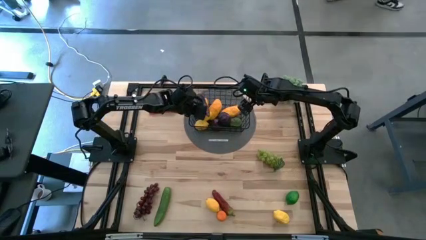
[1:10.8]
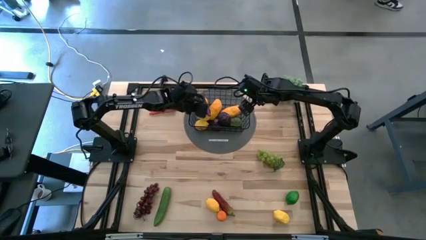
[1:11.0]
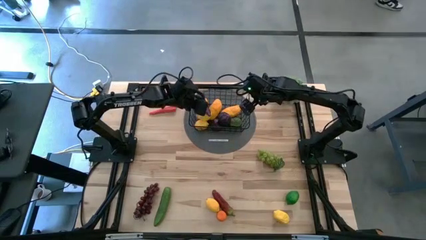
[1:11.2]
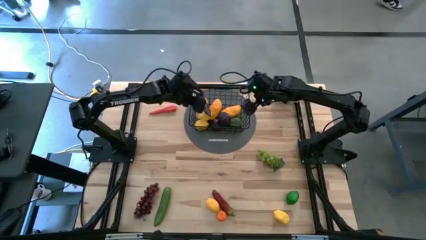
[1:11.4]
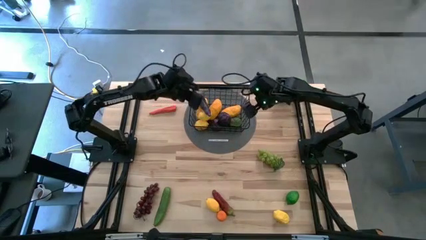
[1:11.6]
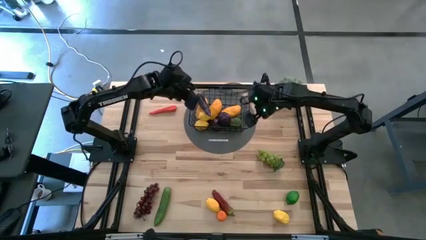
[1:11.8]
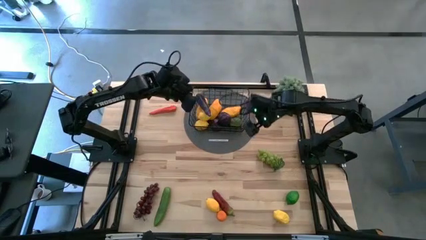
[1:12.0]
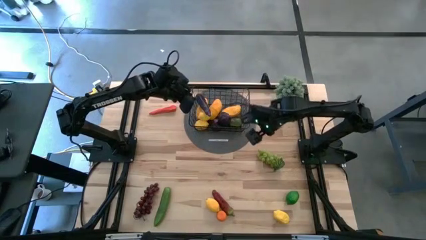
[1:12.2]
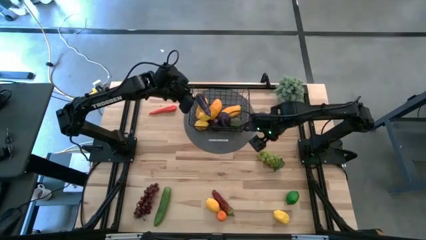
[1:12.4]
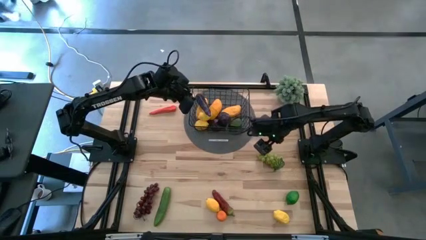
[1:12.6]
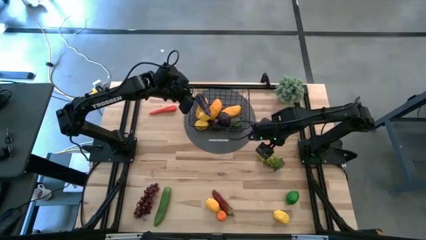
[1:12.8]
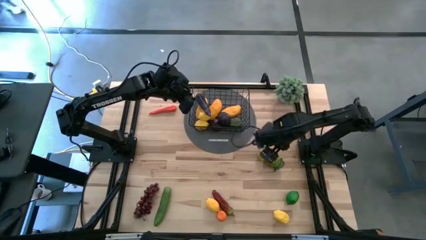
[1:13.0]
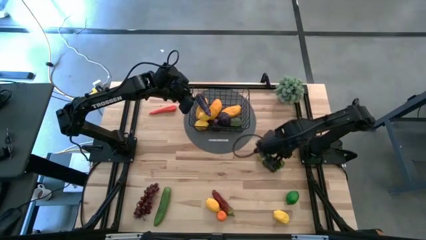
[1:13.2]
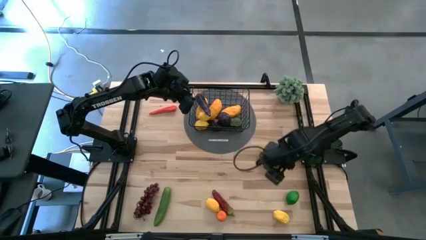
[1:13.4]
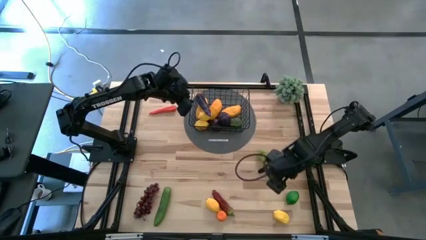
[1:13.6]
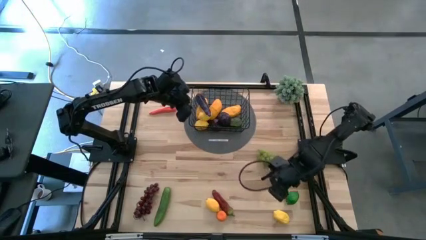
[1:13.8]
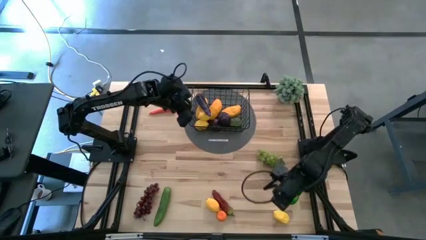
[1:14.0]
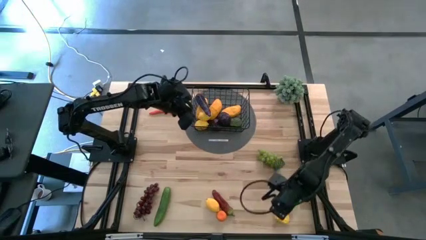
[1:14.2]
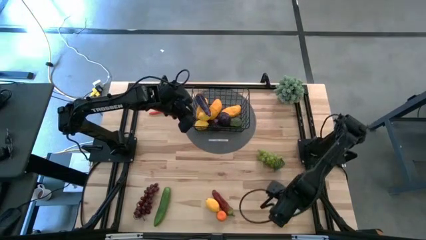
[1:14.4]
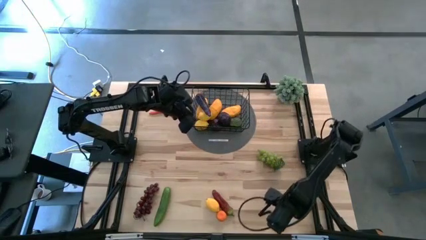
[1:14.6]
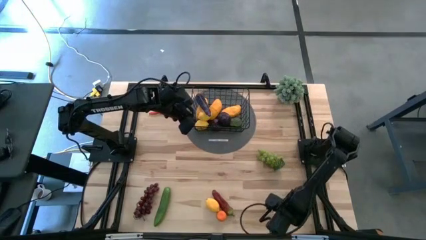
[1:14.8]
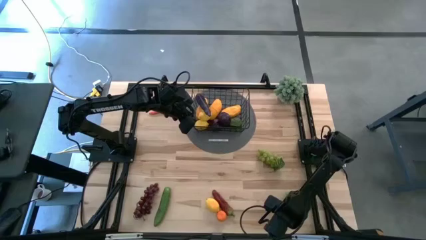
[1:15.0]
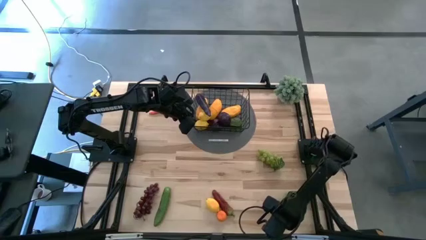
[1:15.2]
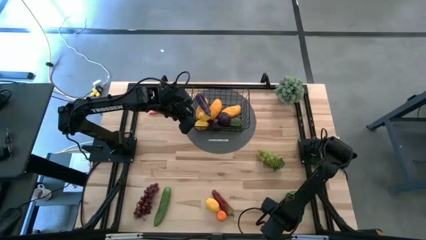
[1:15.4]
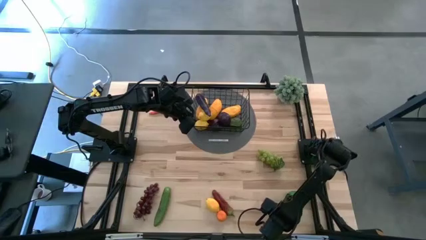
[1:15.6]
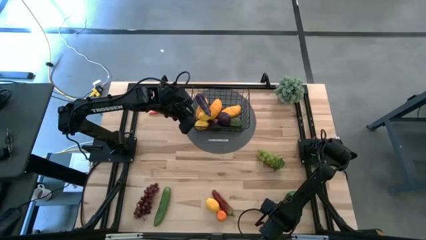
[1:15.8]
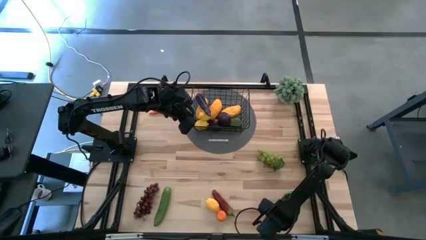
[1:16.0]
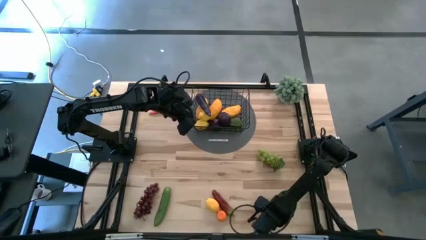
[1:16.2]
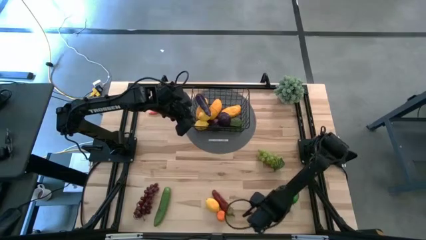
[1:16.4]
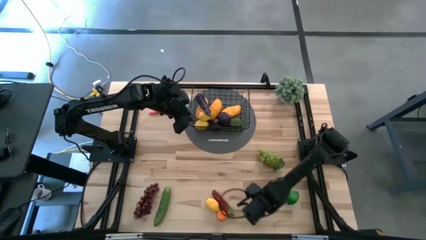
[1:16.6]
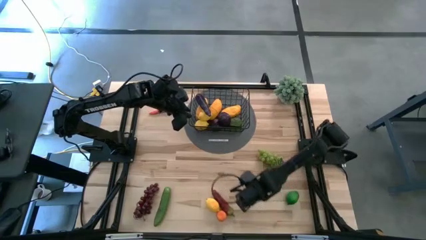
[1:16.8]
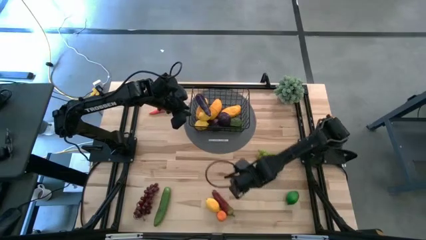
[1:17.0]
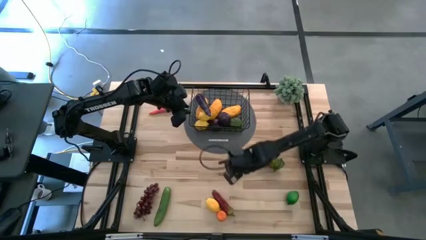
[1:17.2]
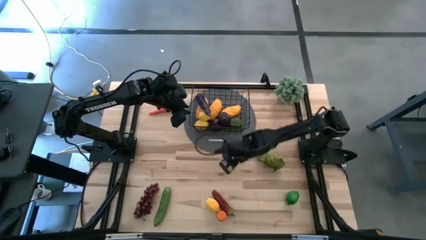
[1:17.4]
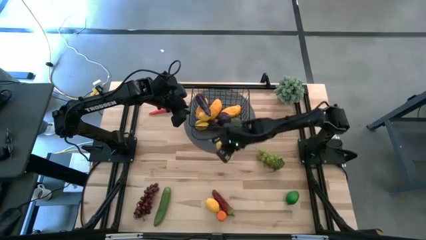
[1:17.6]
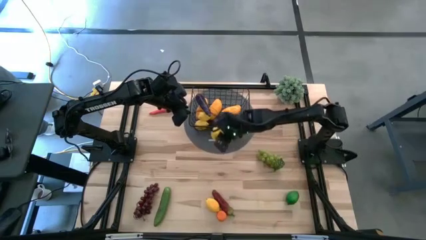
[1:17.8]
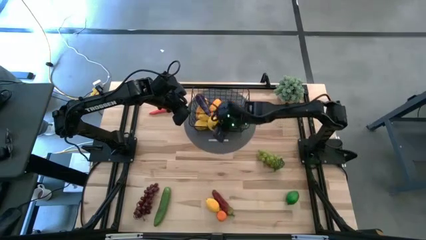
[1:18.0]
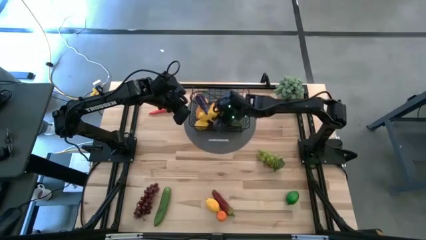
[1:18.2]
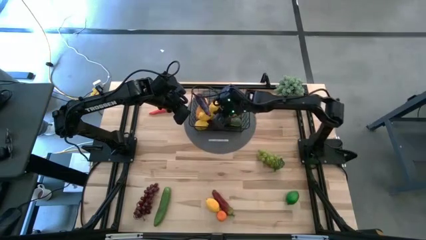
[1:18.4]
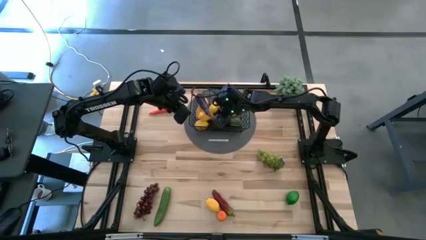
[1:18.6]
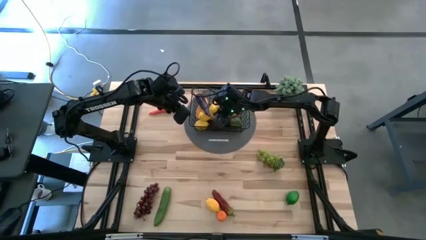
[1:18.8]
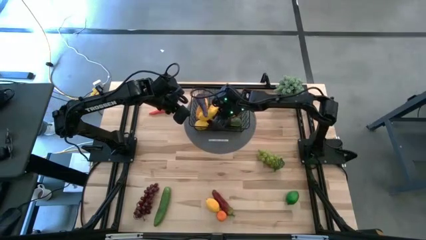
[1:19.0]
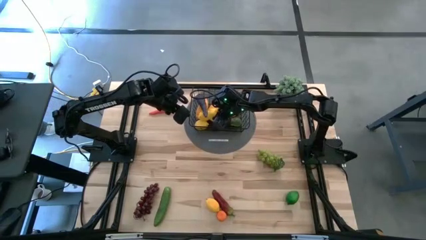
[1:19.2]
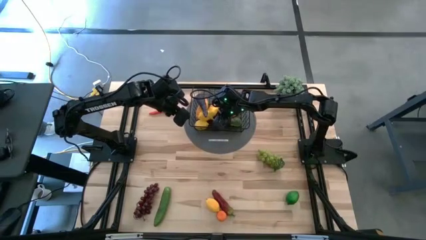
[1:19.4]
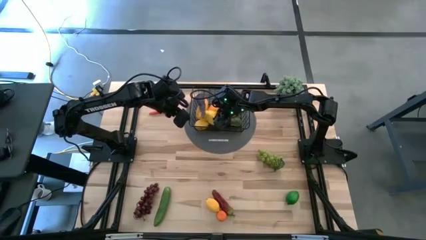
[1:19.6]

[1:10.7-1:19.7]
Task: Build produce basket
Put the yellow lemon into the black wire basket

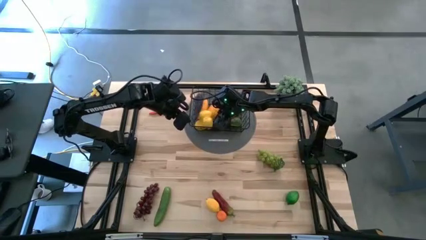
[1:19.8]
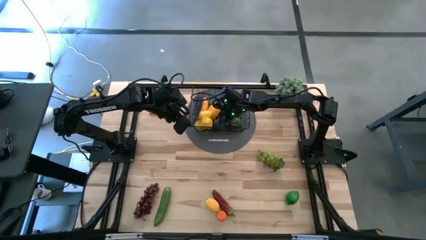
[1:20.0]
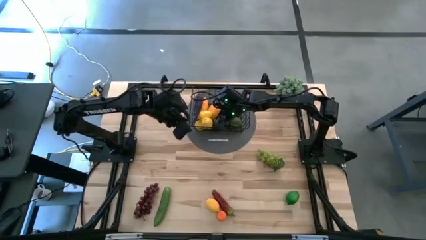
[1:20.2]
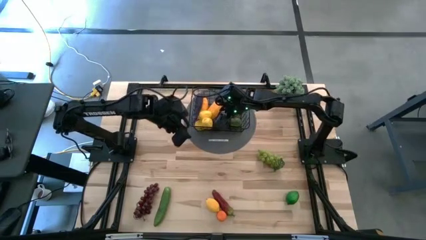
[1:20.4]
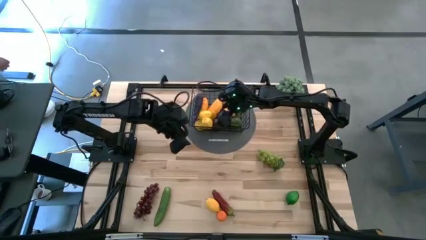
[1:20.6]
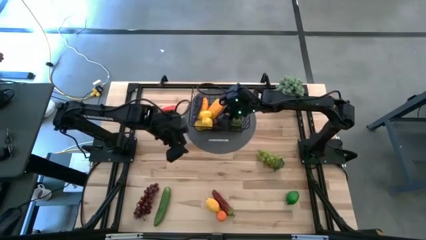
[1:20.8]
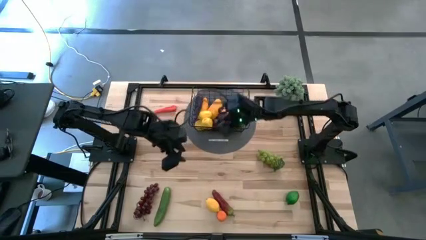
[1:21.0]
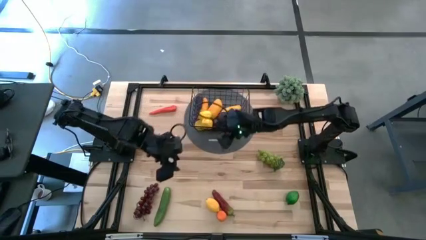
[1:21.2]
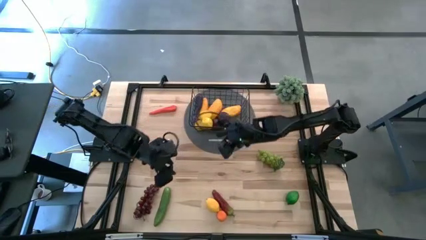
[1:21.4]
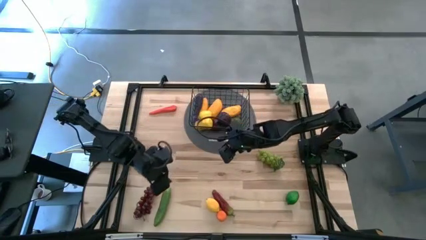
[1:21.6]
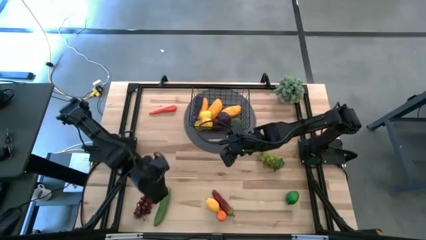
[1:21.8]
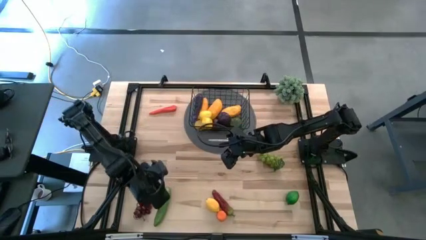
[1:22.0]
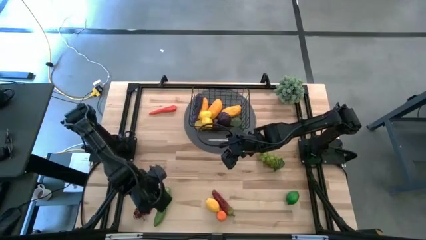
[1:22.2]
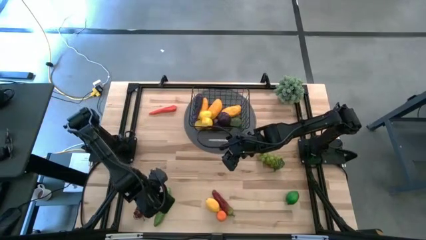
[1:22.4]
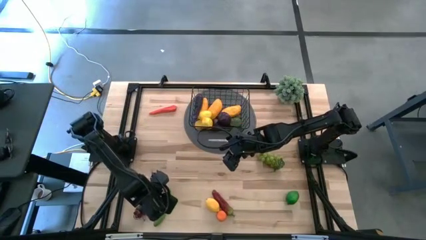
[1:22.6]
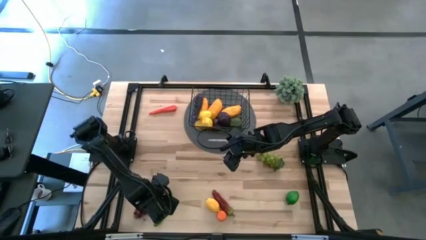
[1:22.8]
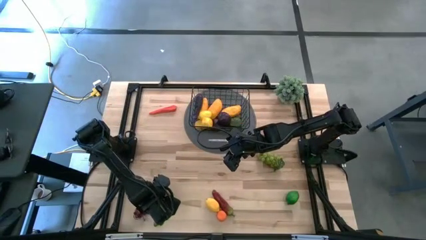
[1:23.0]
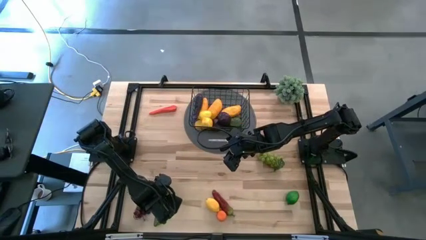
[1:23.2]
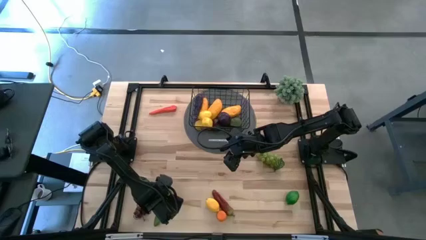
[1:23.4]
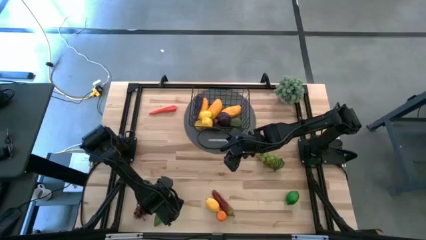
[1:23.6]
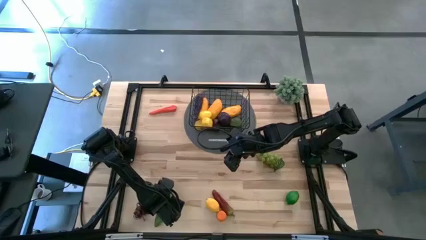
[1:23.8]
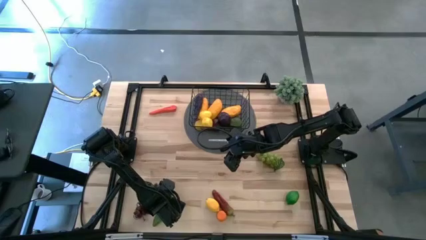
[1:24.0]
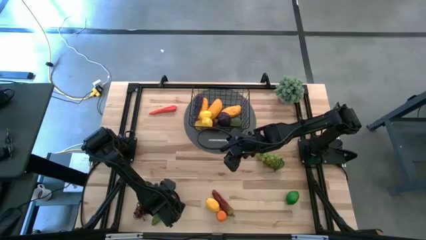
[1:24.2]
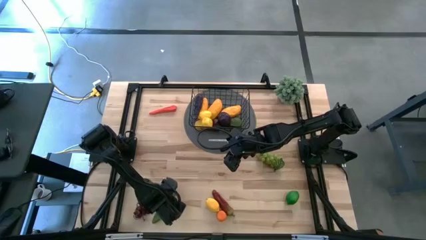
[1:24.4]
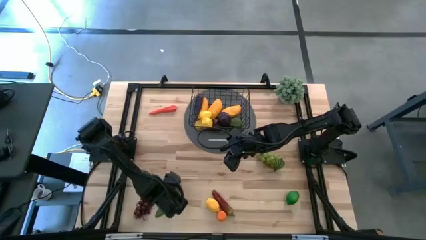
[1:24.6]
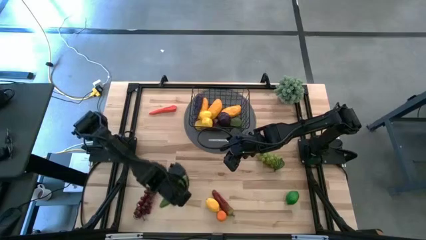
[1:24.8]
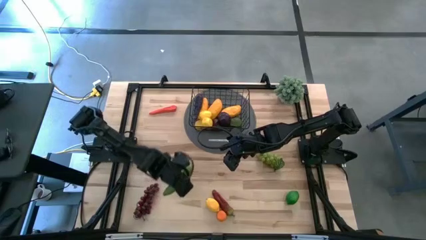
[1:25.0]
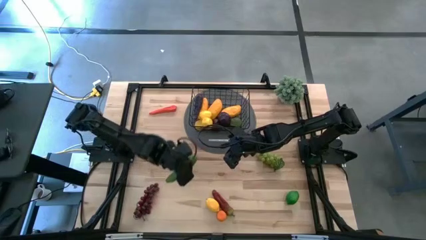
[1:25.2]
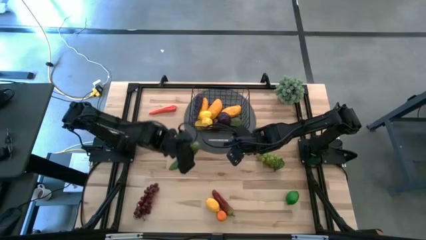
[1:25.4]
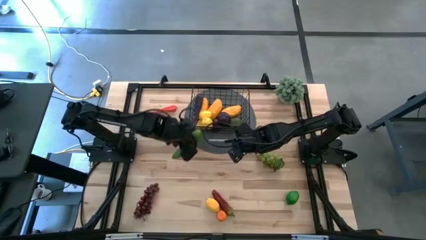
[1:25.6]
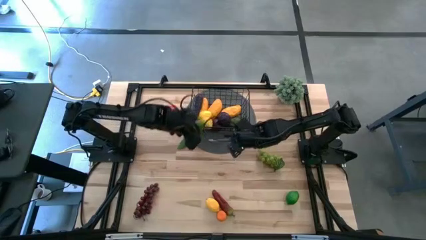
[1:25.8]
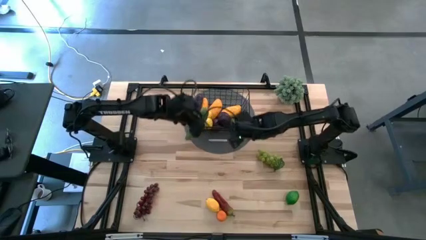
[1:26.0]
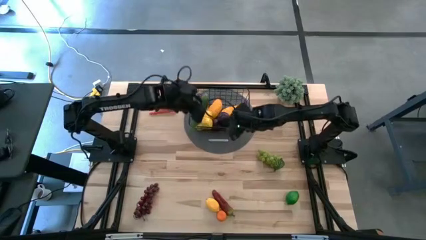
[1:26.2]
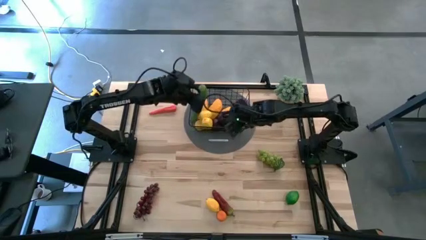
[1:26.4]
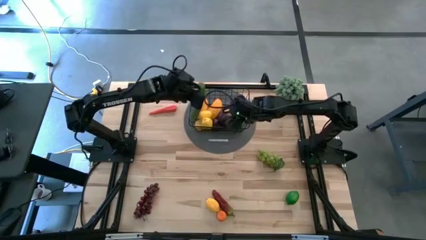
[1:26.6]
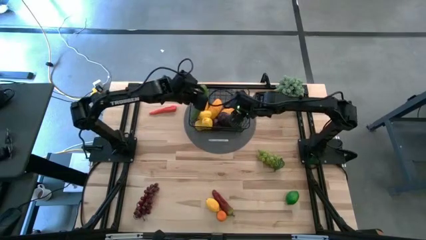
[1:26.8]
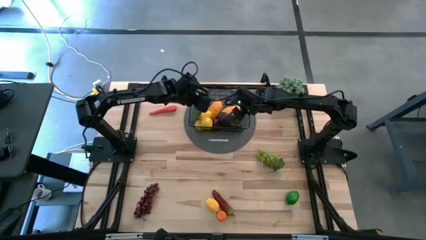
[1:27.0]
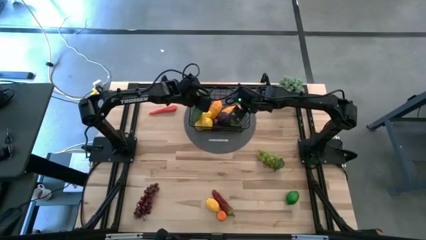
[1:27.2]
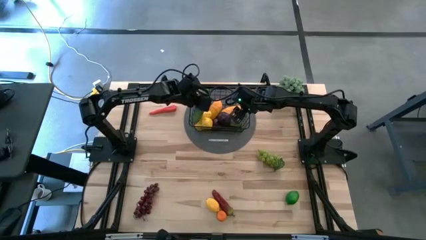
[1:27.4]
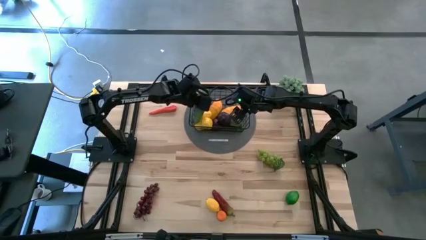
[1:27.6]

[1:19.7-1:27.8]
Put the green cucumber into the black wire basket

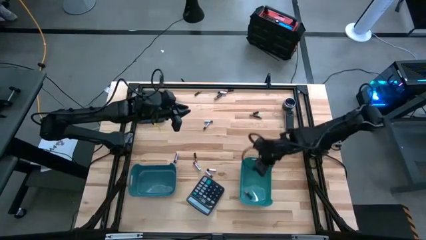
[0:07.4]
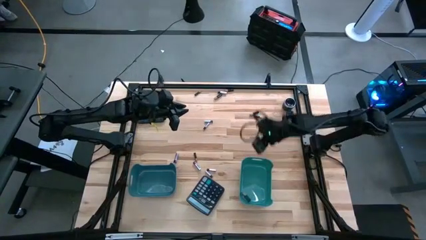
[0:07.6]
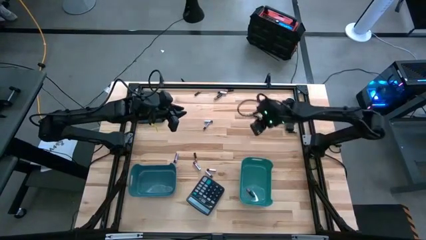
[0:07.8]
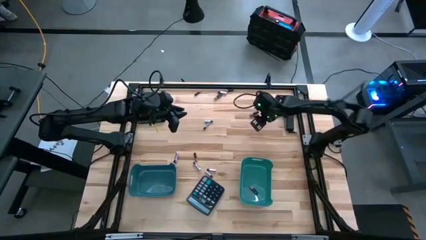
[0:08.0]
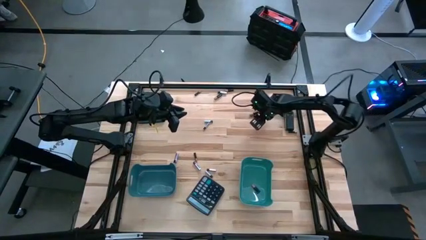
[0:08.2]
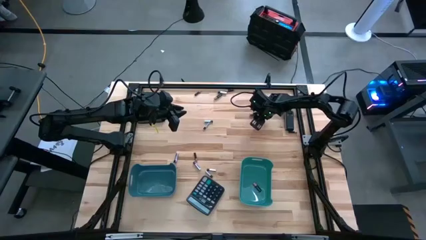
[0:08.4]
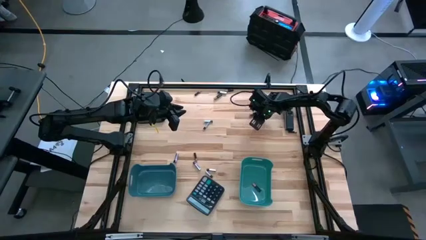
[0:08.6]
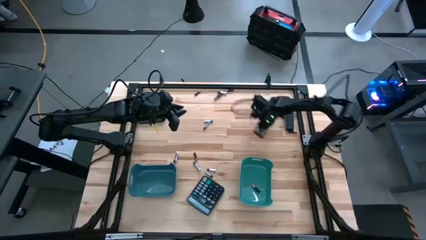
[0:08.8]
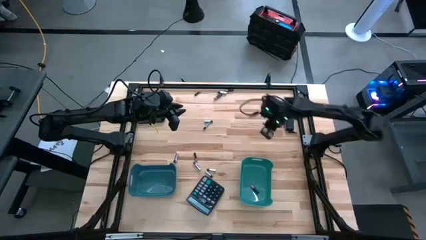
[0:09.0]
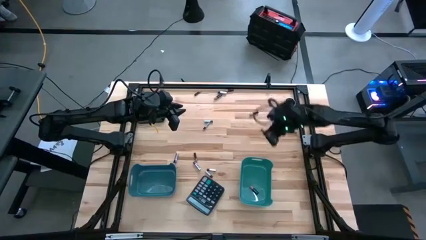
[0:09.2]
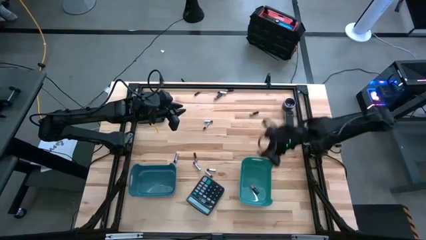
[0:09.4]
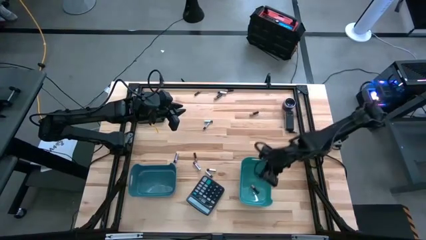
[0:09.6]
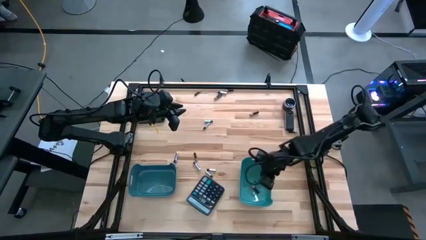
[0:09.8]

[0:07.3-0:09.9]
Task: Sort batteries
Put the black battery into the dark green bin
